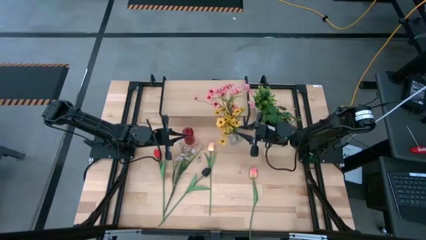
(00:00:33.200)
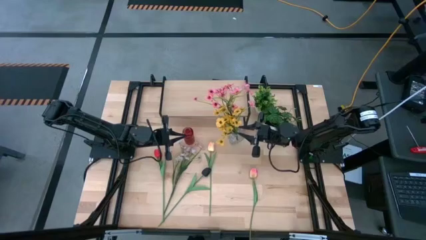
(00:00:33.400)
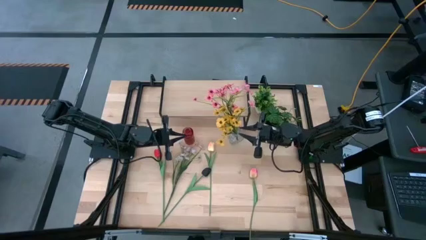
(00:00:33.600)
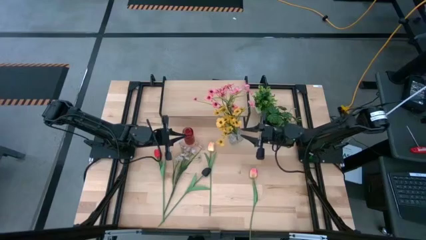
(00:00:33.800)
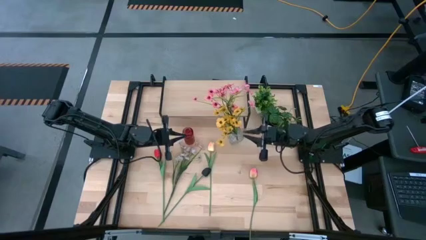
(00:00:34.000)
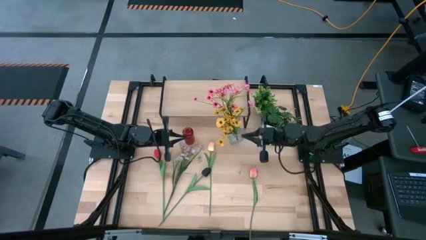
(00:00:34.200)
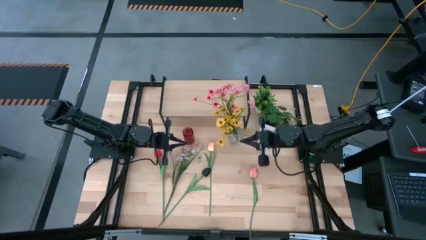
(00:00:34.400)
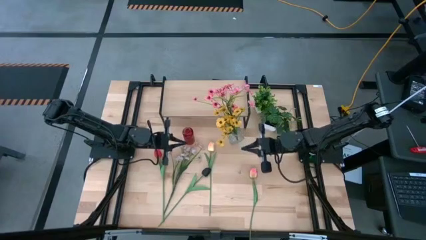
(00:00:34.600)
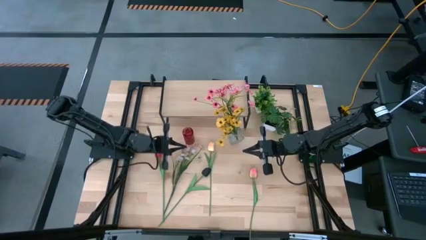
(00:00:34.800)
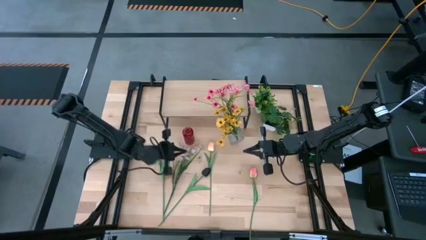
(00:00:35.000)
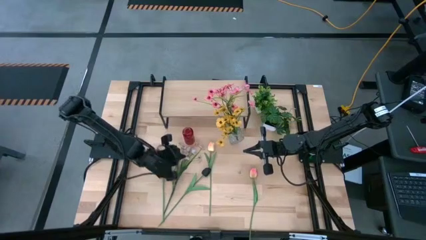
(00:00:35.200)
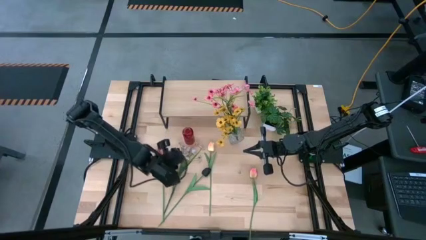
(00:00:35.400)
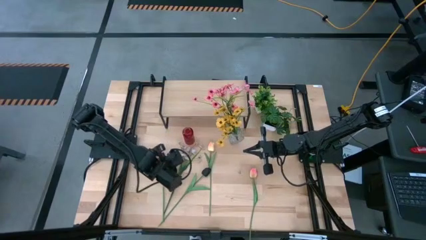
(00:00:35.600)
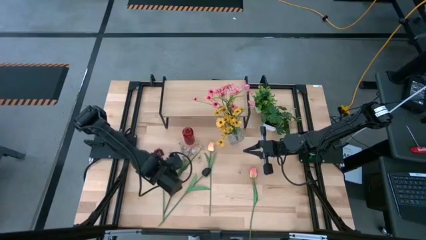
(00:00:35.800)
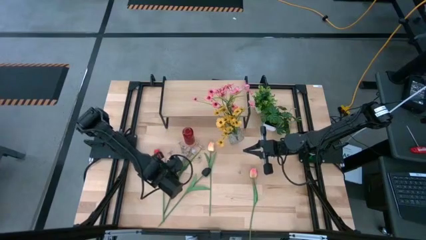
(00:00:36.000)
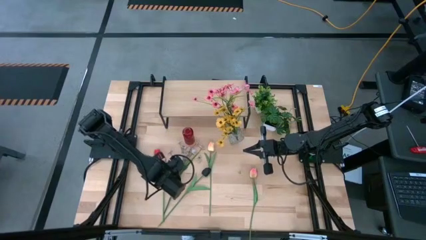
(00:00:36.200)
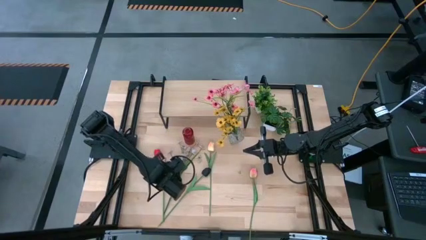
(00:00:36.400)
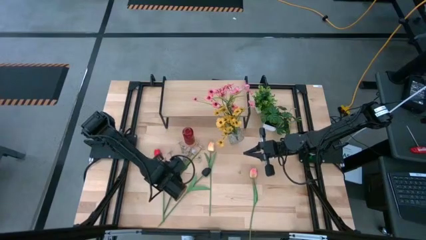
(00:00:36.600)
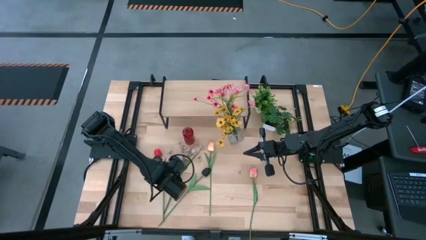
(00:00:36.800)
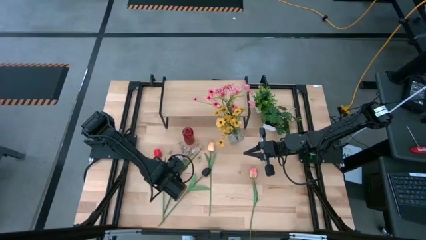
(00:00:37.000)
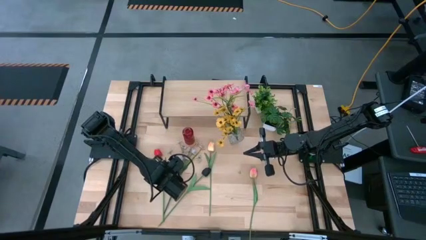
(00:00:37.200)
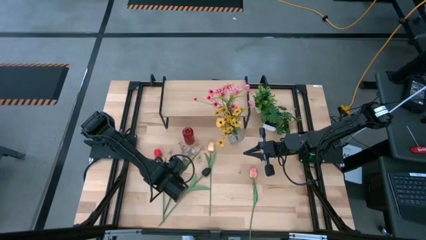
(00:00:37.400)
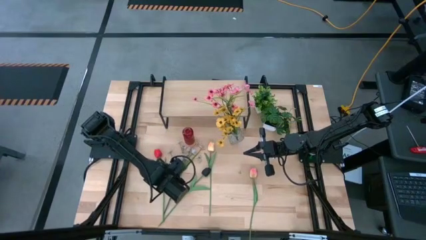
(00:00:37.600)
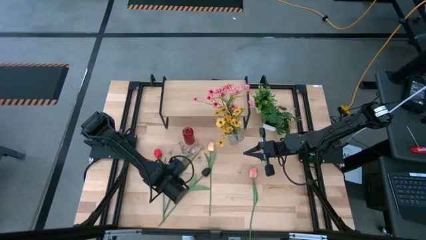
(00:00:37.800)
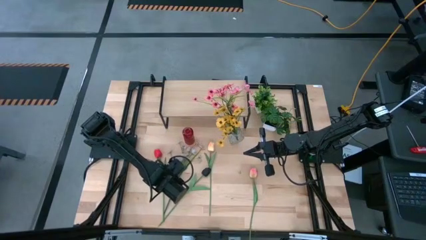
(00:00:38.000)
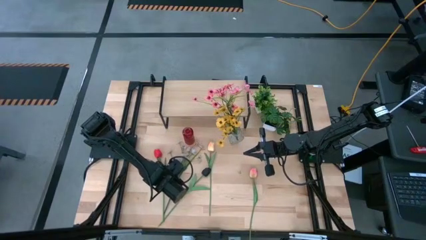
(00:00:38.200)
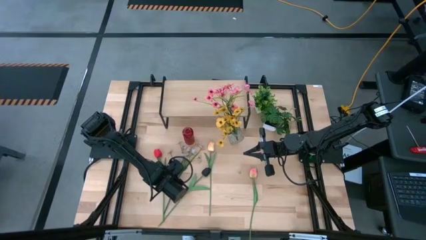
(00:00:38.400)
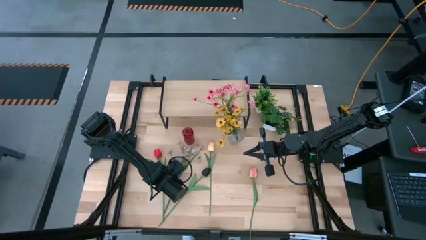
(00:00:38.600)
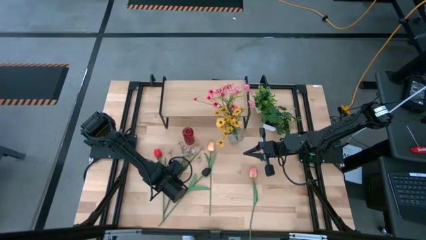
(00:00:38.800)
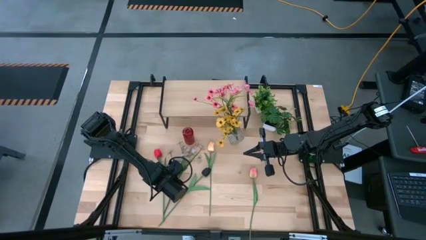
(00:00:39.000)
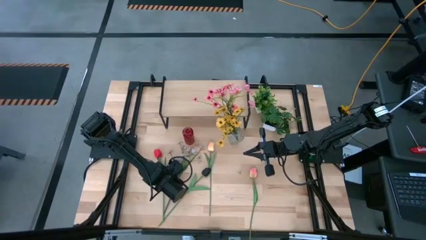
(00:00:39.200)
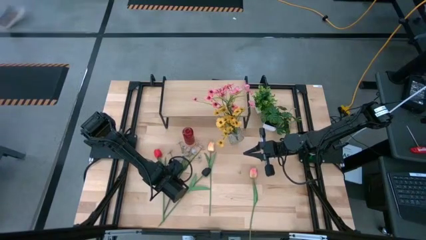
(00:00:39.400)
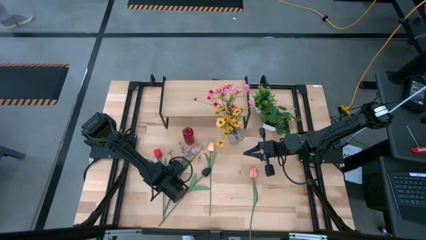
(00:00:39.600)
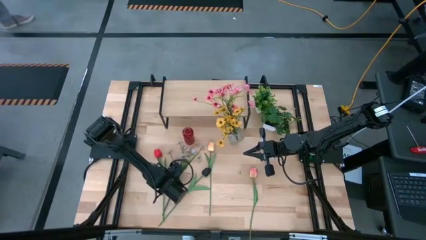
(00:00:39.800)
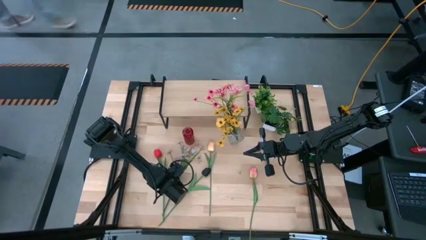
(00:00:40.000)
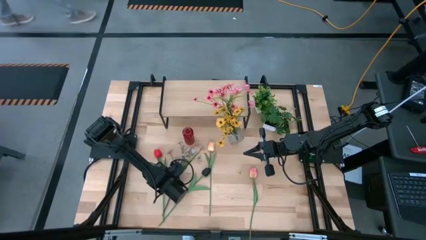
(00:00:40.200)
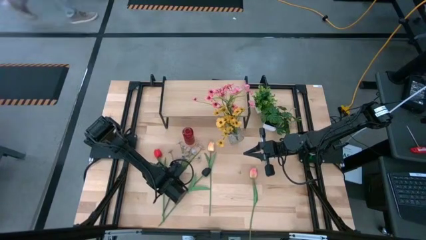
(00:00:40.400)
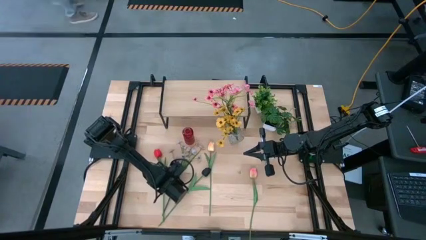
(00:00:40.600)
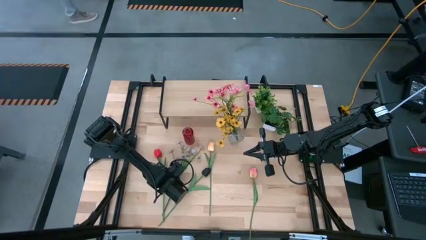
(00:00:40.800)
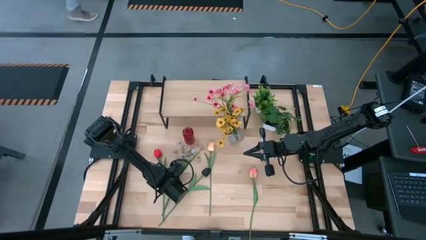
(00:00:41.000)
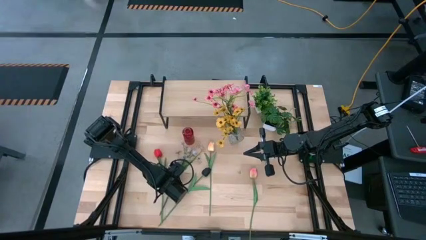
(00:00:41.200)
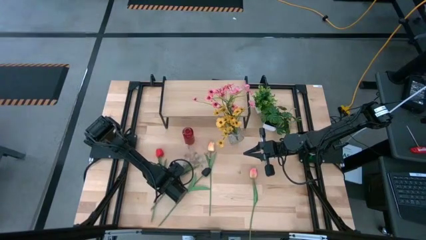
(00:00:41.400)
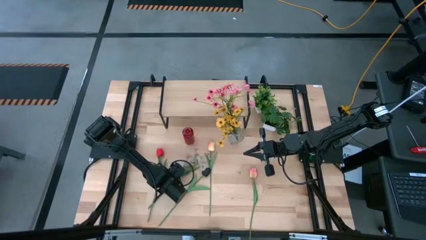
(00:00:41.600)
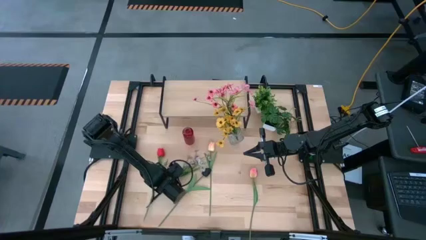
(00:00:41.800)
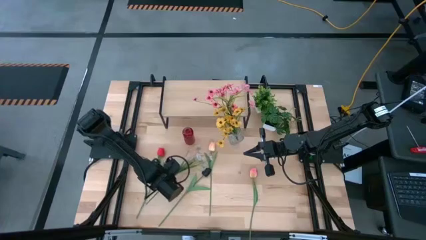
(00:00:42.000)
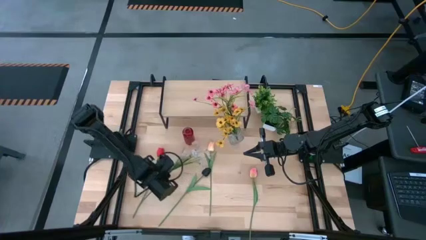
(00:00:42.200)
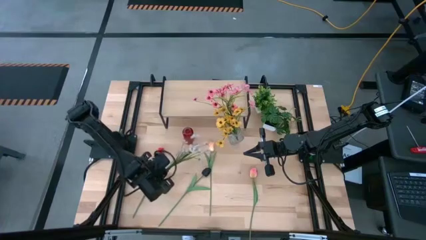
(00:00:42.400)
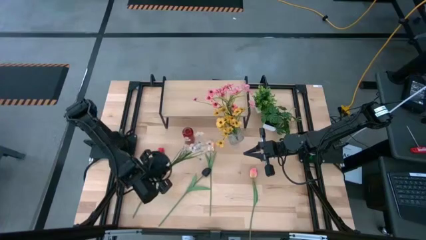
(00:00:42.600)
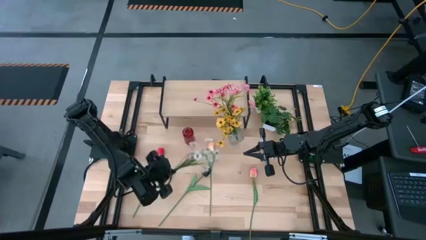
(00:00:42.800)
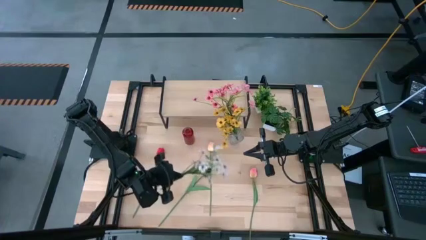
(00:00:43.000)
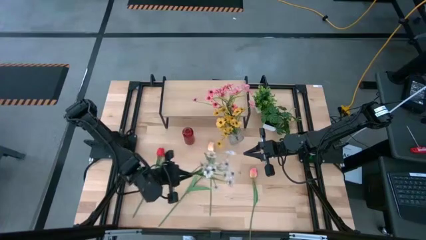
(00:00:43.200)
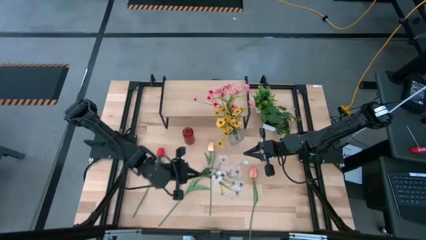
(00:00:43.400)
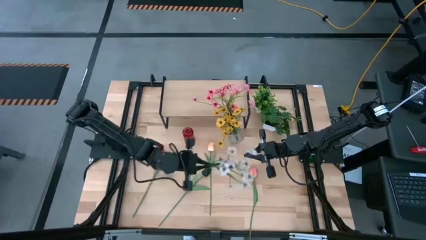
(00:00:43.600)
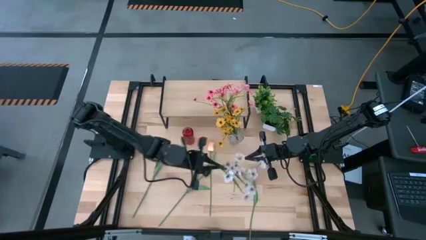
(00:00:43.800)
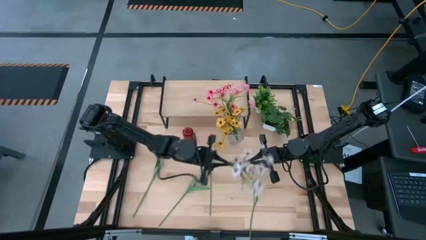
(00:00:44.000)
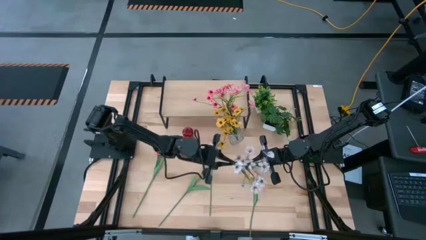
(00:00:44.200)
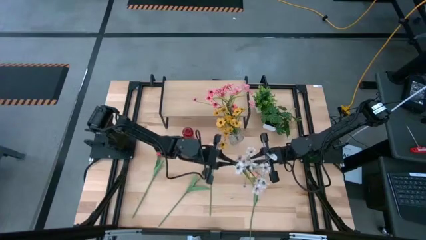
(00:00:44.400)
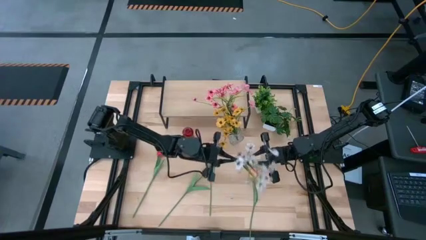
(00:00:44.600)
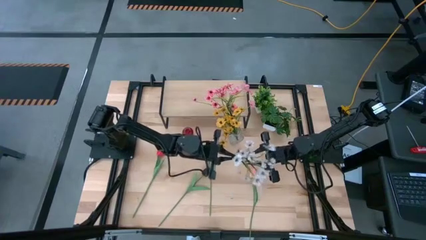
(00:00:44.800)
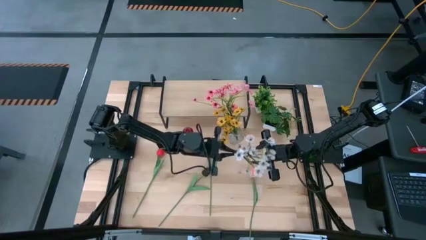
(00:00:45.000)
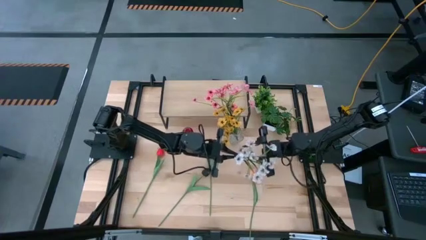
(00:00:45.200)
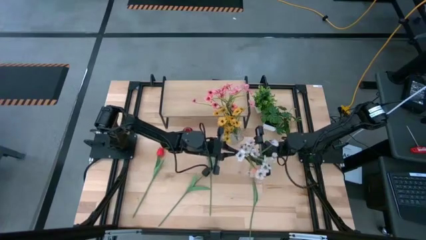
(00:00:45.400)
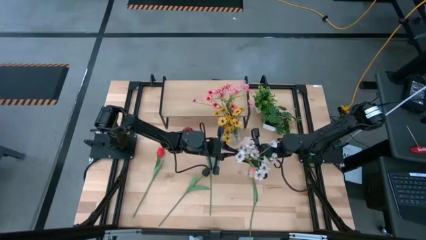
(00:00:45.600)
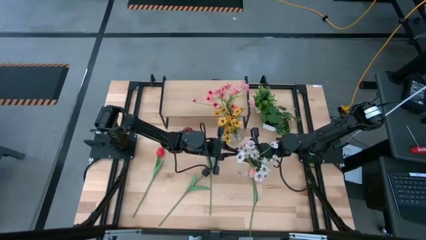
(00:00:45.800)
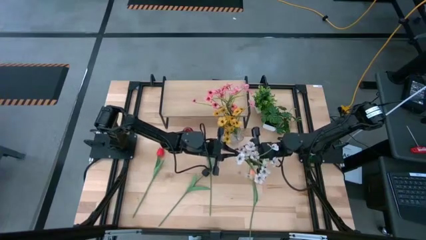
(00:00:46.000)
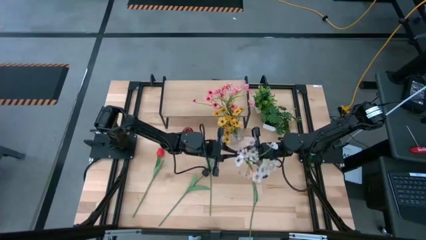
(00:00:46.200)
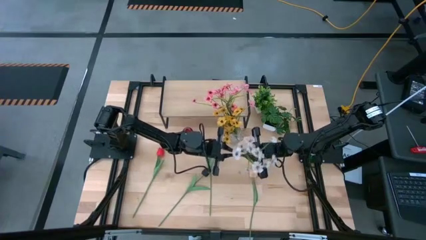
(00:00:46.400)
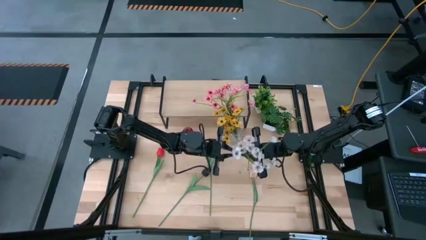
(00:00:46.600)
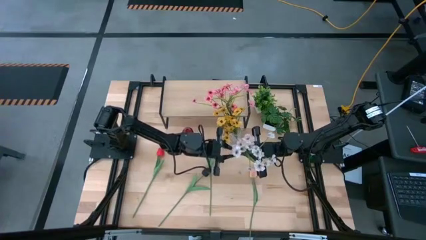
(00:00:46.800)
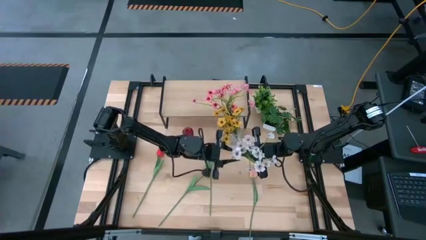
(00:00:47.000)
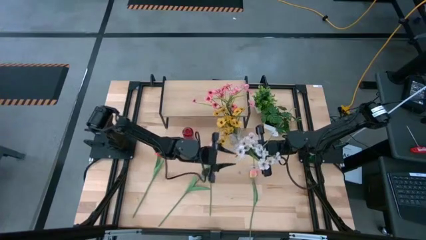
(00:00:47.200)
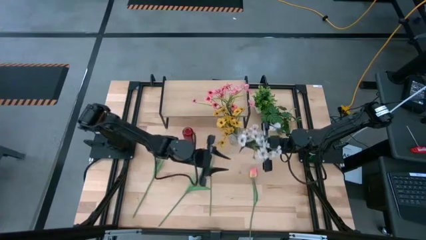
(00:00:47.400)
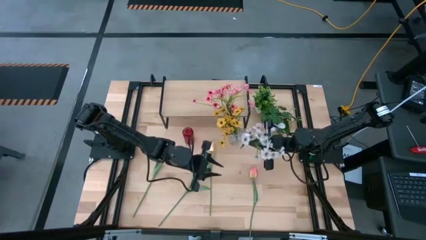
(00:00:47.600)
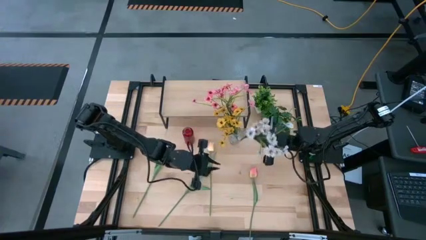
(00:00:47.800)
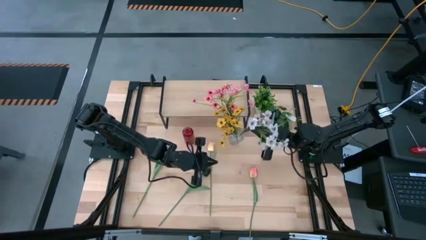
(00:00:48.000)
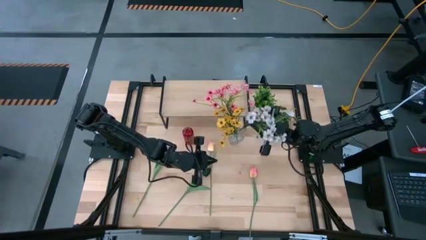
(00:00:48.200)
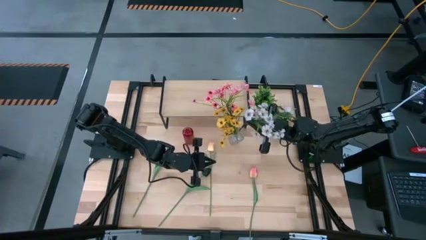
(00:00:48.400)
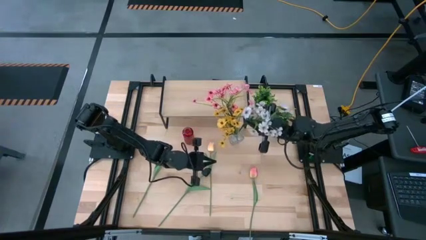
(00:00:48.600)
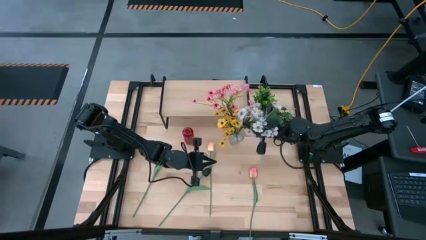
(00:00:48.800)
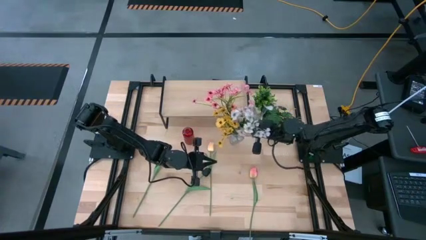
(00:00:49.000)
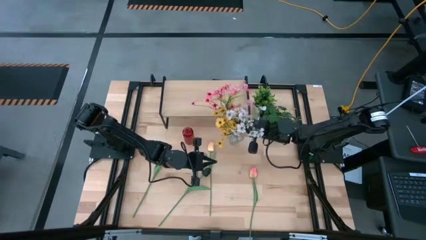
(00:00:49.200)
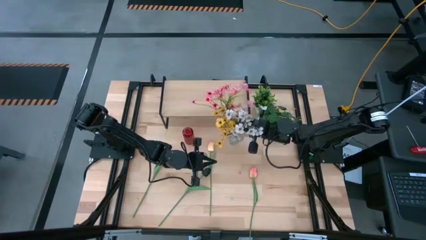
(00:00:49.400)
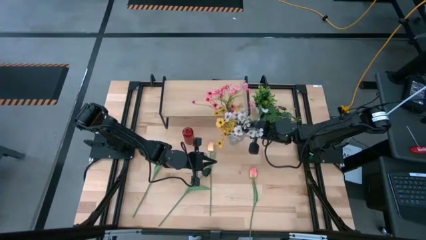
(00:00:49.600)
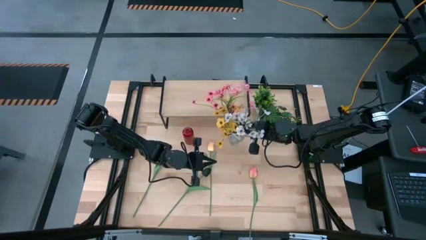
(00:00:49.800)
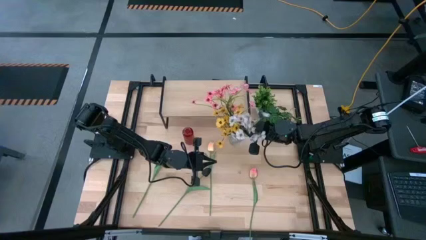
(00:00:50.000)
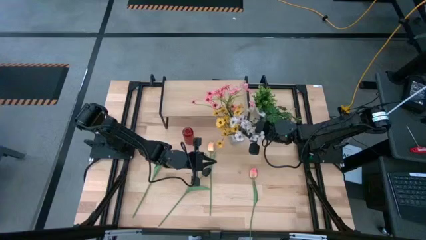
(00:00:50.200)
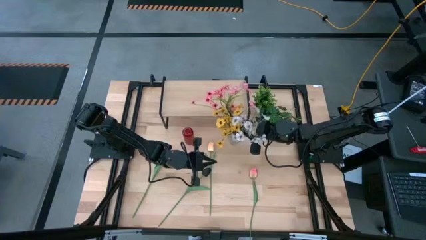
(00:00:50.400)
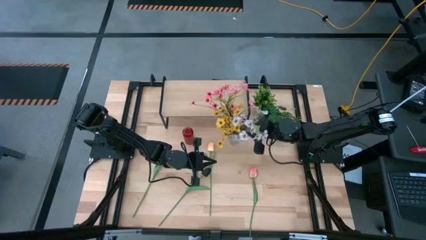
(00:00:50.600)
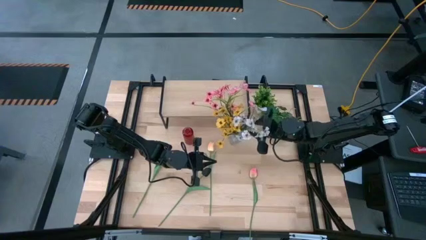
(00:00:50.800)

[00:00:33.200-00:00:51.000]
Task: Pick and place flowers into a vace then onto a shelf
Put the white flowers into the transparent flower vase
